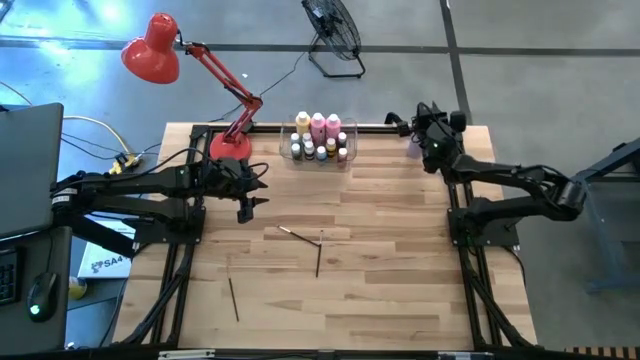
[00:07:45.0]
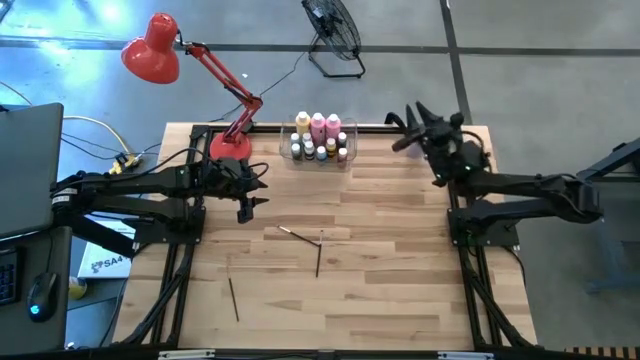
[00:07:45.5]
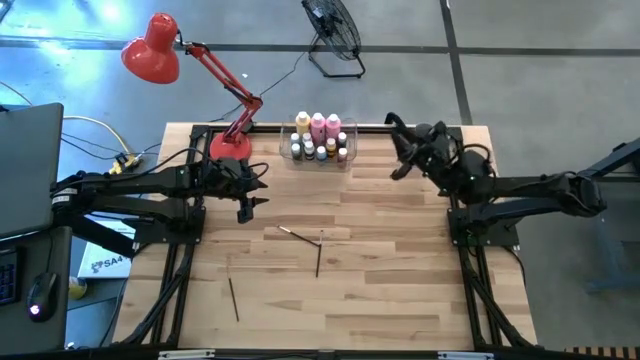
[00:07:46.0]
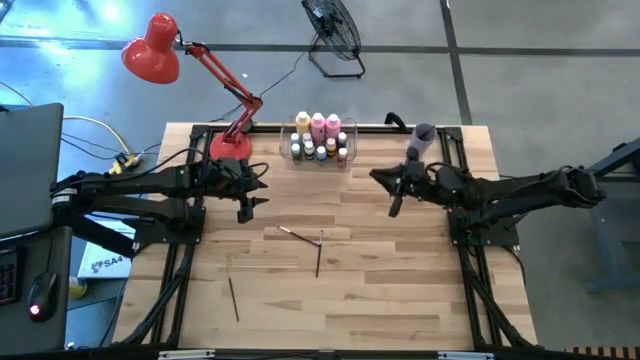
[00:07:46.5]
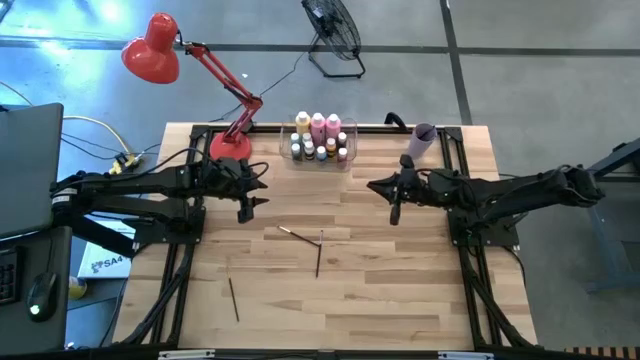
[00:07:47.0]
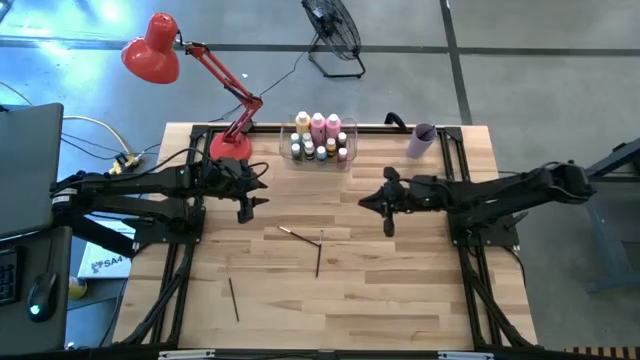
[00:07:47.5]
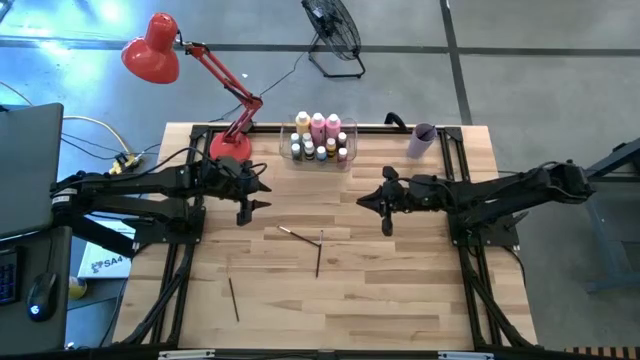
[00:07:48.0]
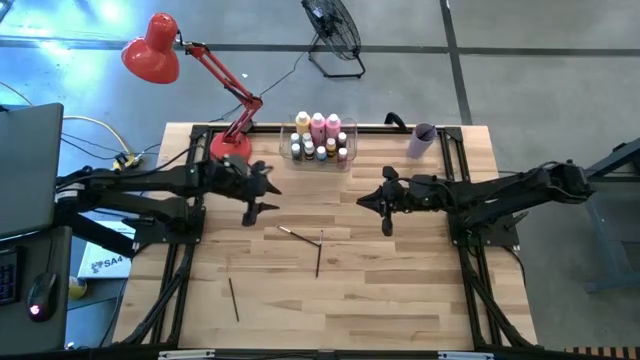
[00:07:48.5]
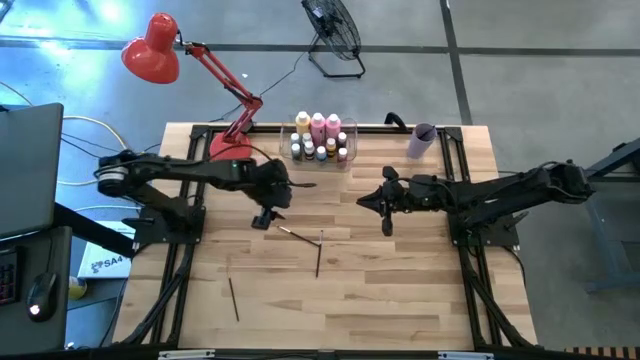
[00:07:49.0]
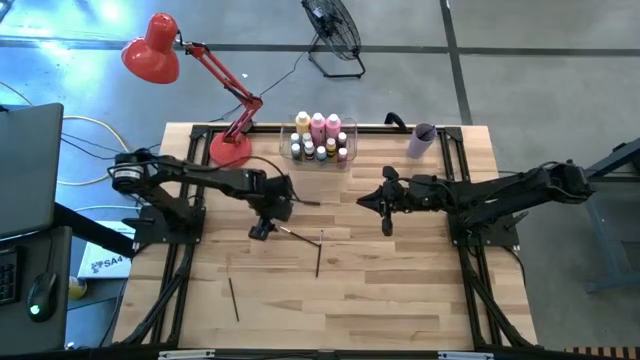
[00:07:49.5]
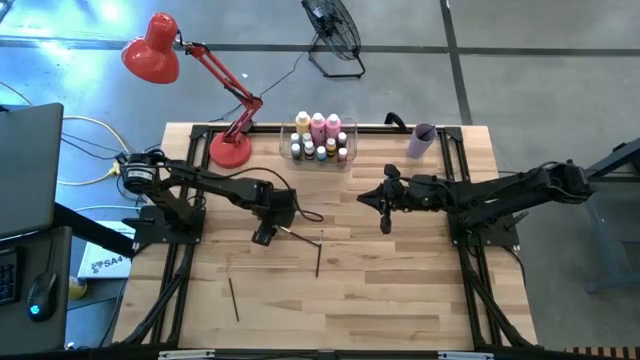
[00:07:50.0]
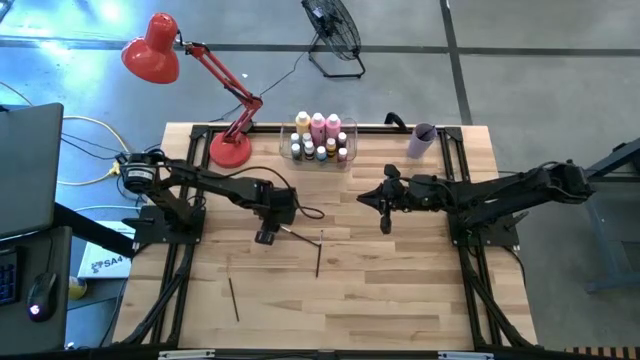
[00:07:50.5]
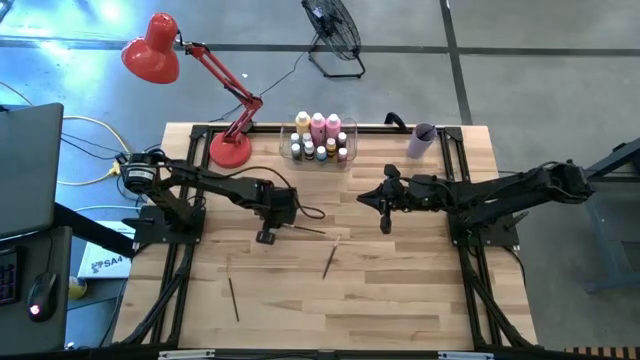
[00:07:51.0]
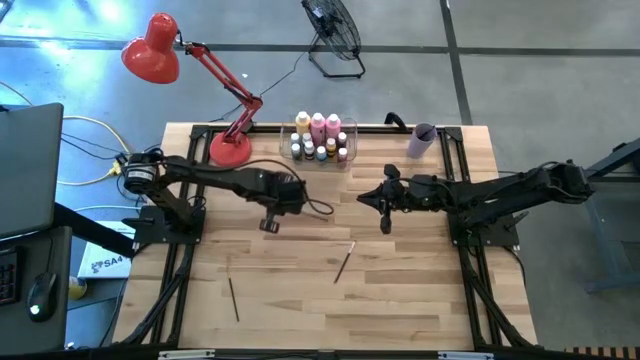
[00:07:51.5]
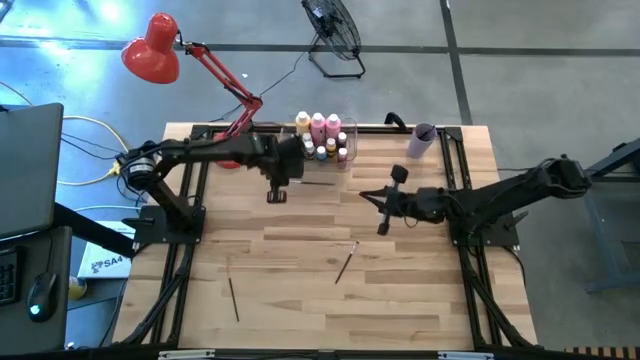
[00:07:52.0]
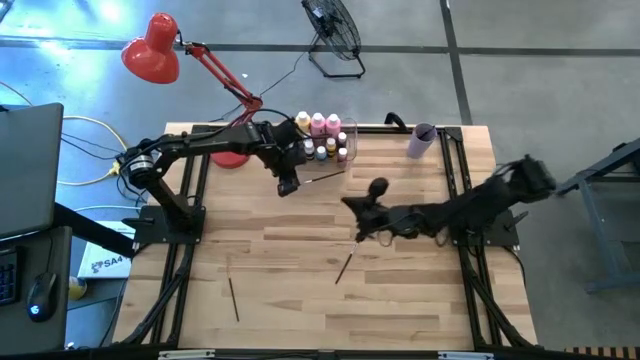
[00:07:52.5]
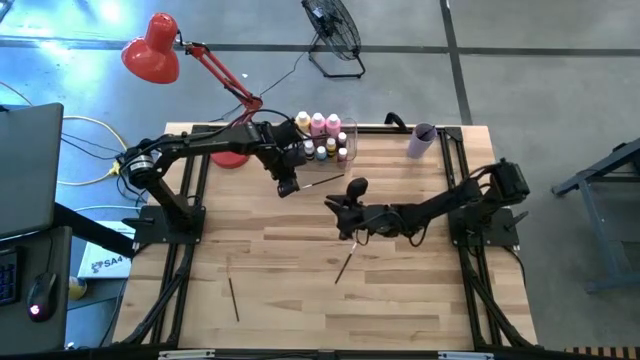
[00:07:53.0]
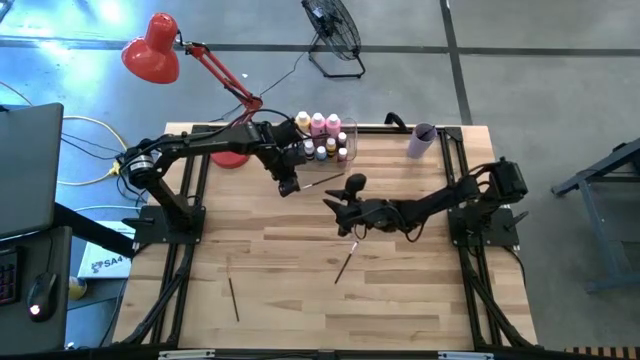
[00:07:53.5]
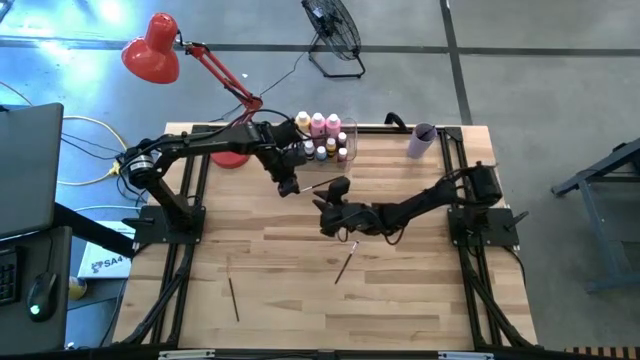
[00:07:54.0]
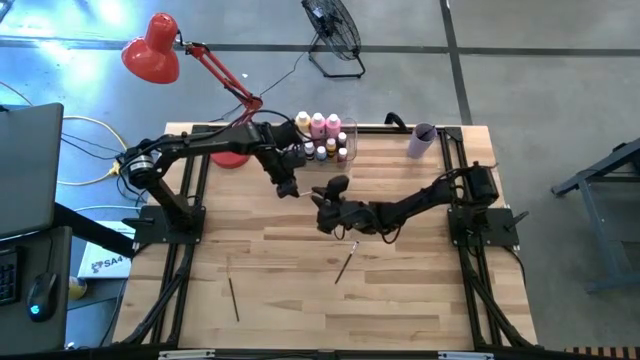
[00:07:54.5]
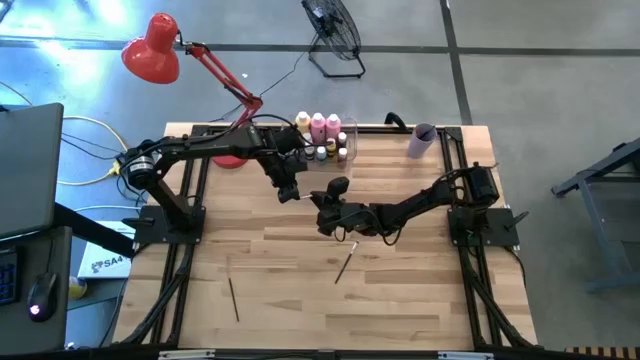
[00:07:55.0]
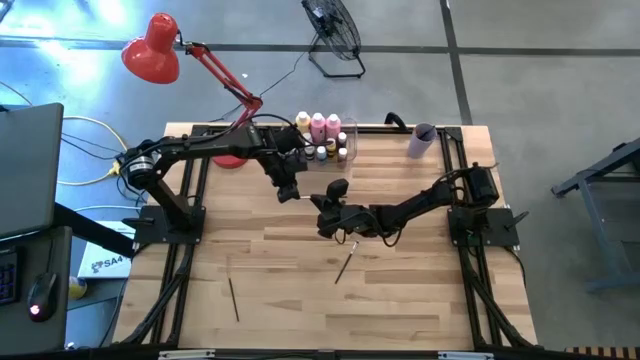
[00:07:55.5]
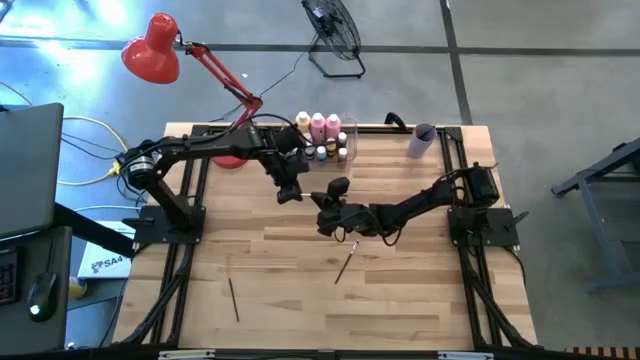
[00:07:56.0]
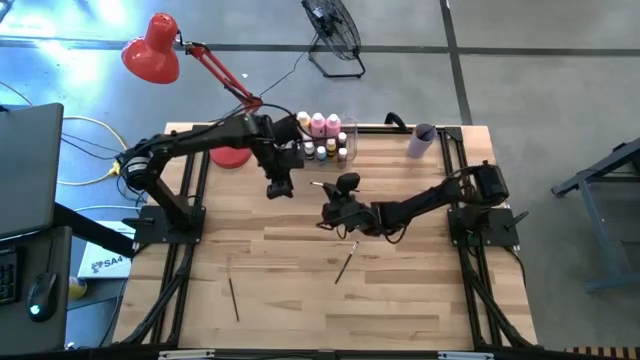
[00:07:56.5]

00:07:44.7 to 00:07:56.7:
Task: Pick & Place Paint Supplies
Put the black paint brush into the violet cup

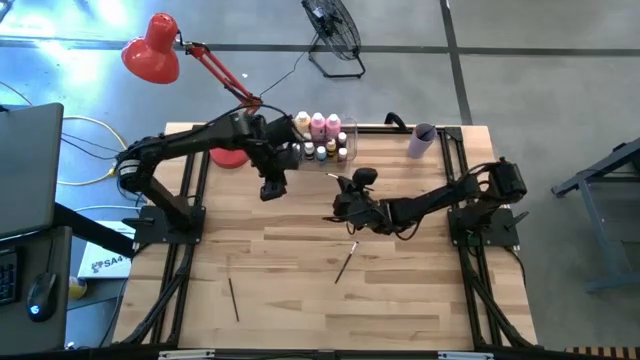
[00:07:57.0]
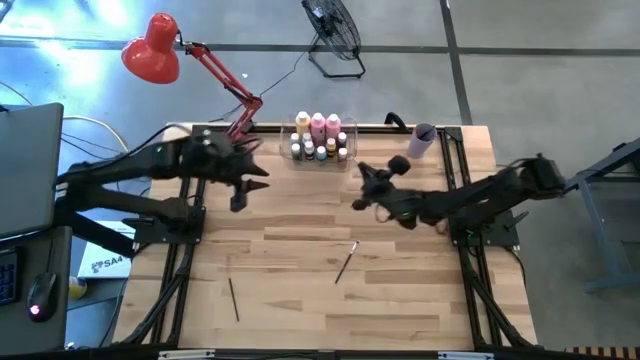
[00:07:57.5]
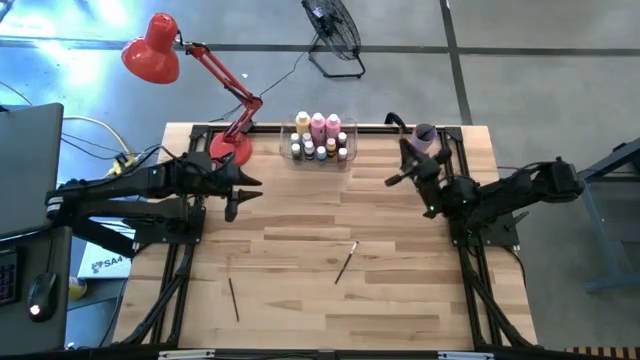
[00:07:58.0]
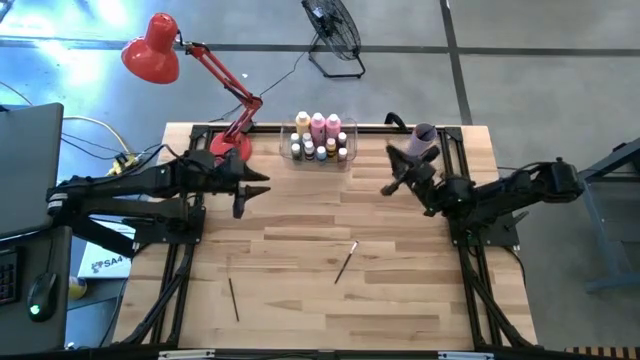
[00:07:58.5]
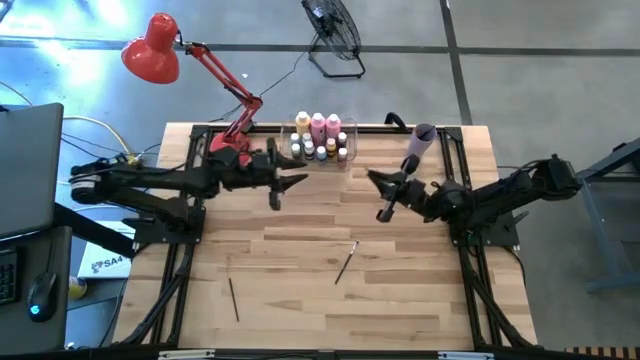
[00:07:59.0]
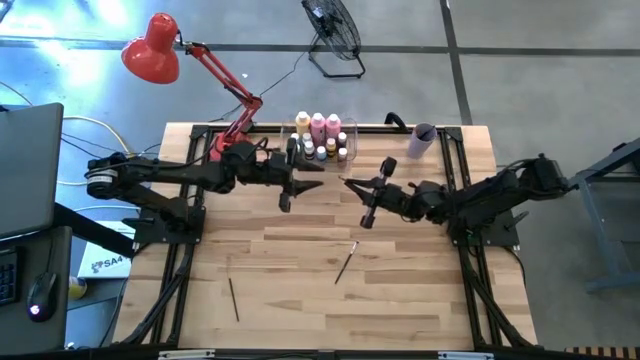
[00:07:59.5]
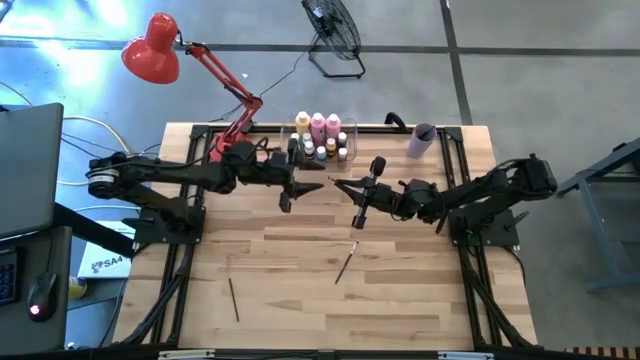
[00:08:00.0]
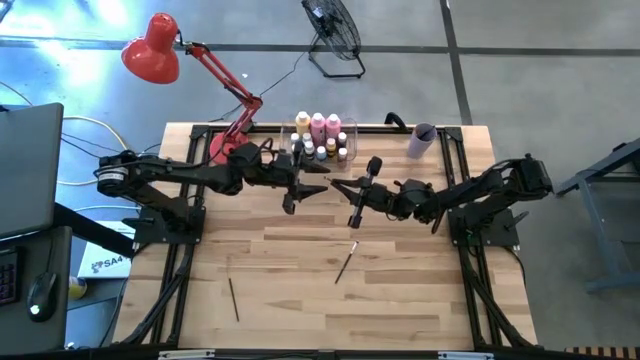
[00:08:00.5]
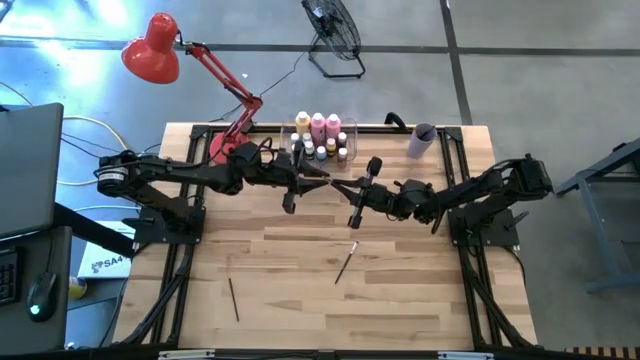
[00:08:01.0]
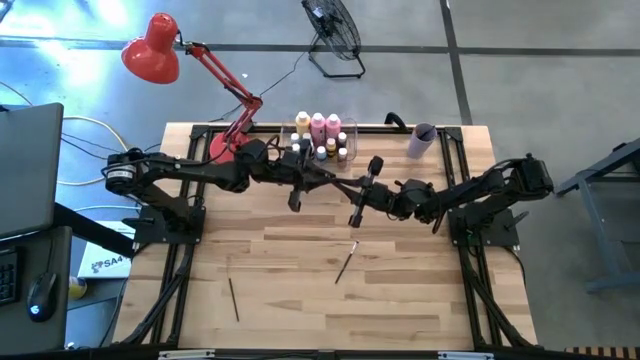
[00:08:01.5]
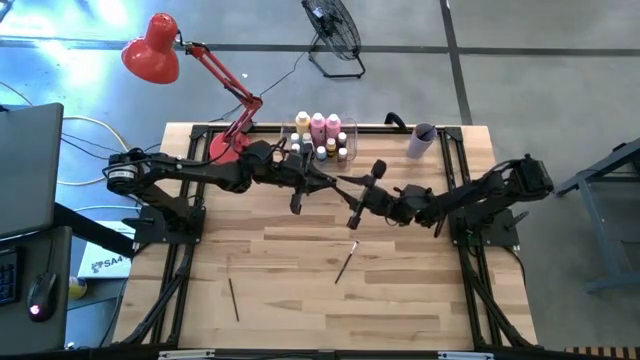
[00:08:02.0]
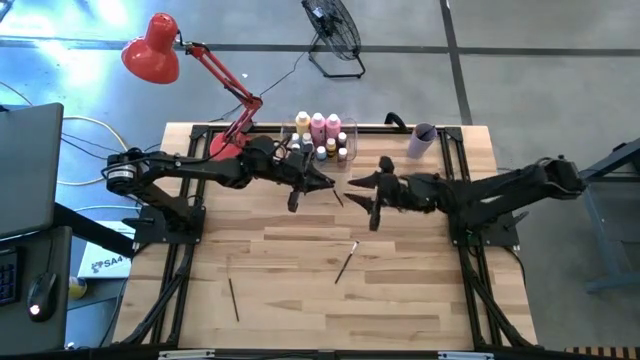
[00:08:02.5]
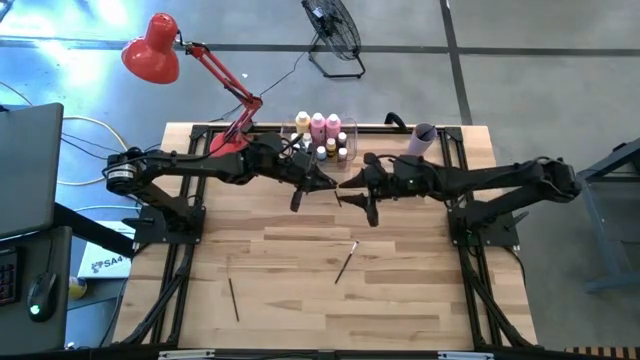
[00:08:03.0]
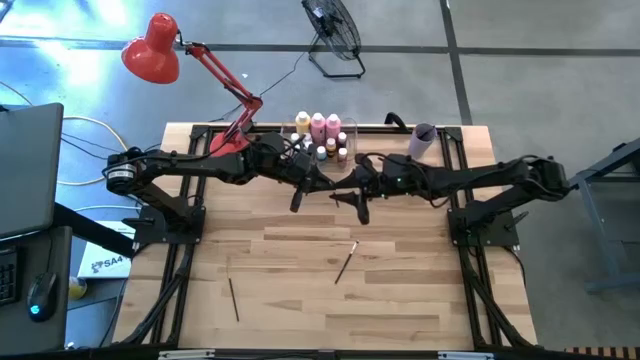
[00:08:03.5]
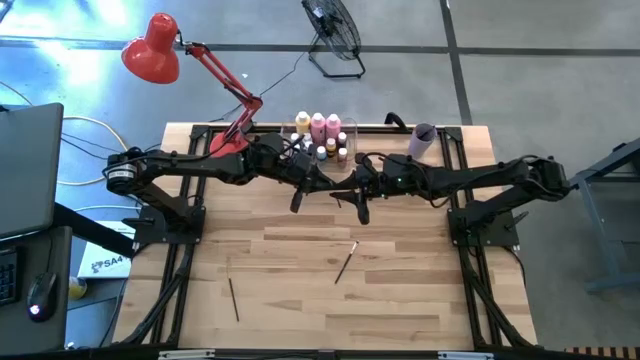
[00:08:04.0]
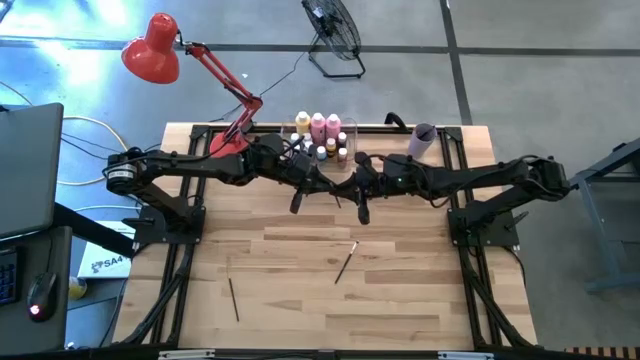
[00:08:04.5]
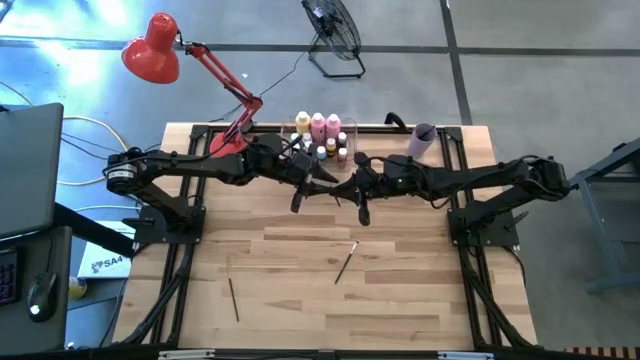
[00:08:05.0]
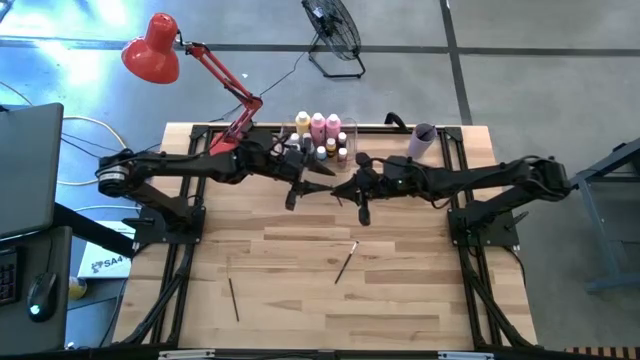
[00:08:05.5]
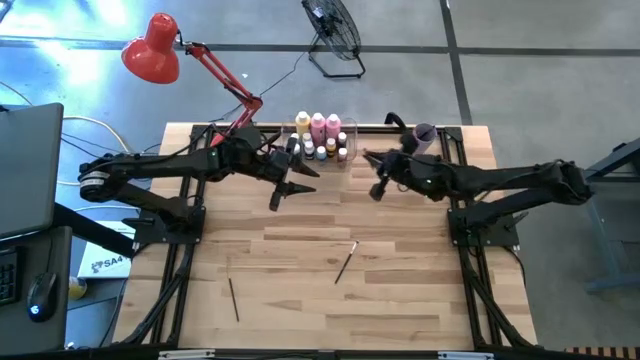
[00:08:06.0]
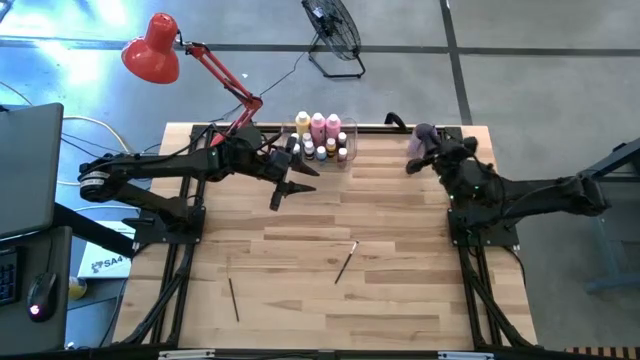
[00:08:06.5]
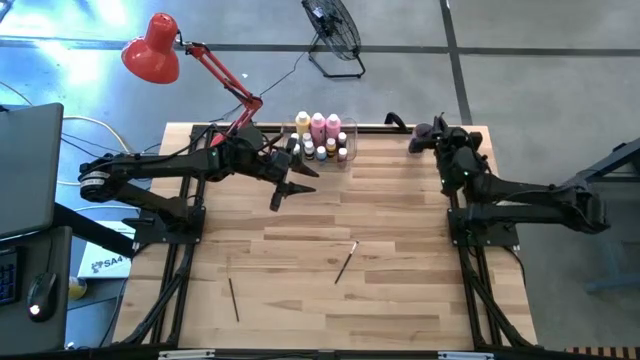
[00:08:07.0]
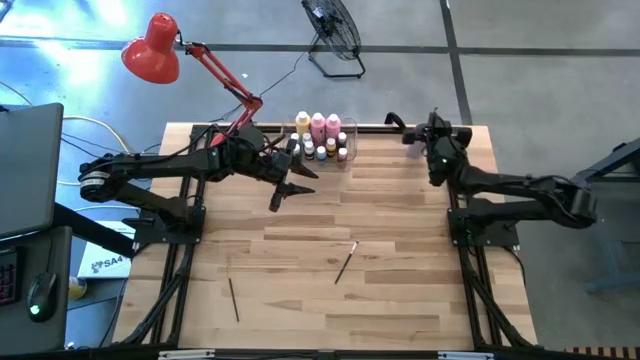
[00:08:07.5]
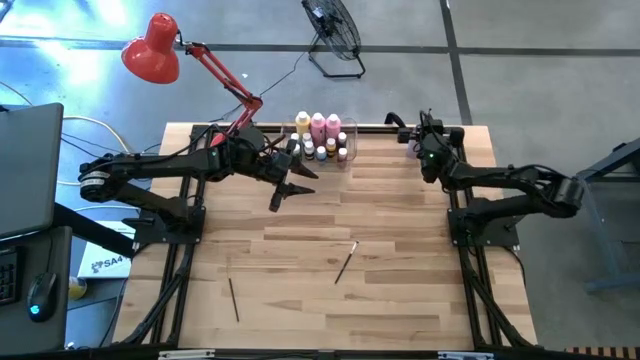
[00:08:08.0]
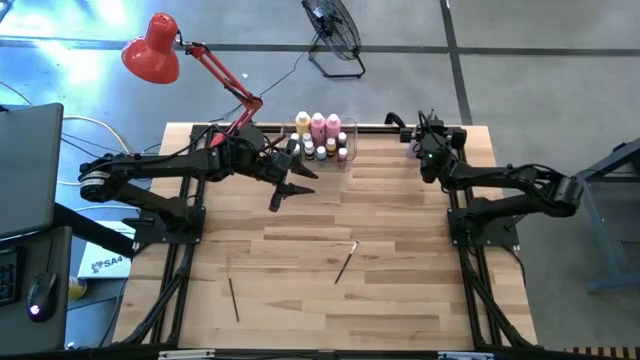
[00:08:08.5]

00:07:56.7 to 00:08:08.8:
Put the black paint brush into the violet cup
